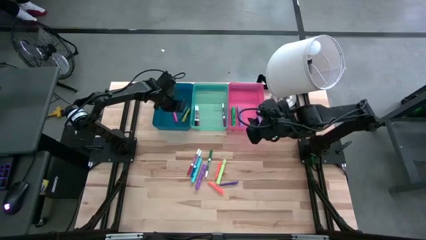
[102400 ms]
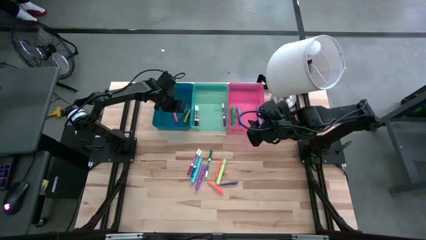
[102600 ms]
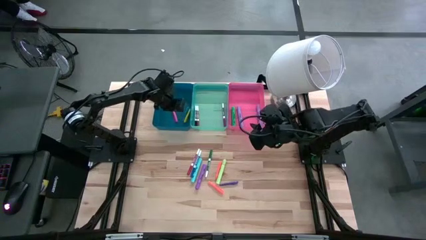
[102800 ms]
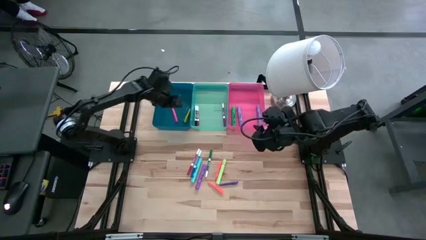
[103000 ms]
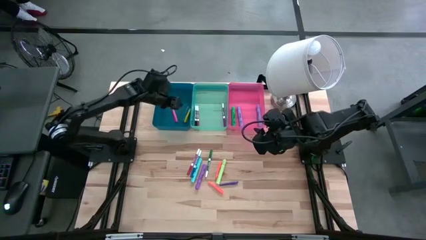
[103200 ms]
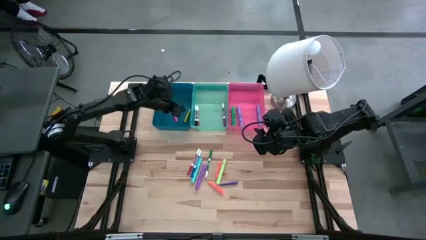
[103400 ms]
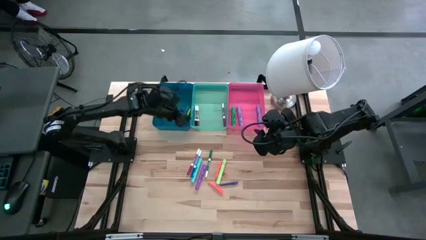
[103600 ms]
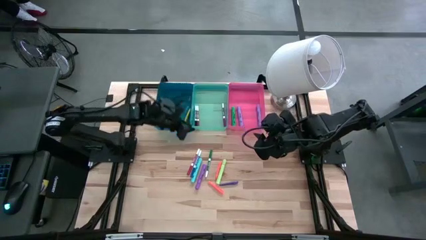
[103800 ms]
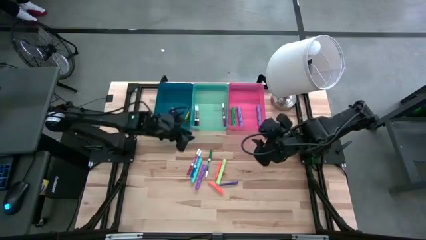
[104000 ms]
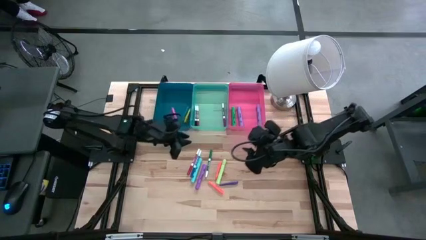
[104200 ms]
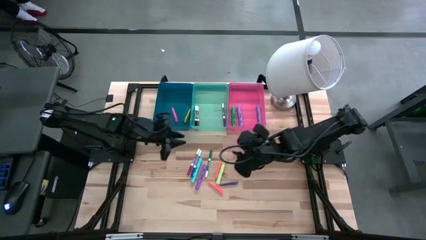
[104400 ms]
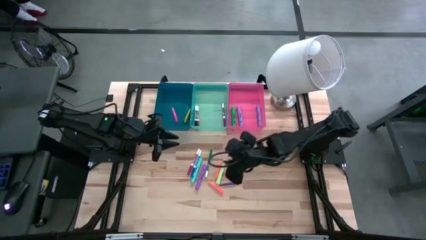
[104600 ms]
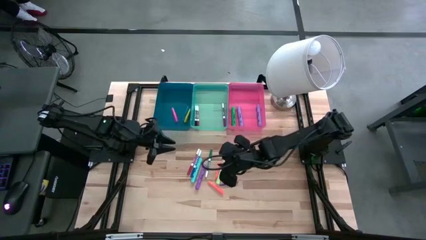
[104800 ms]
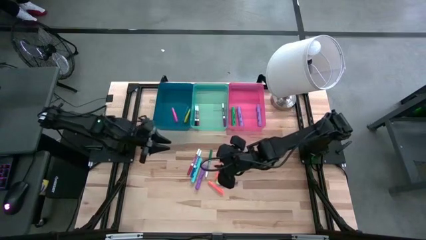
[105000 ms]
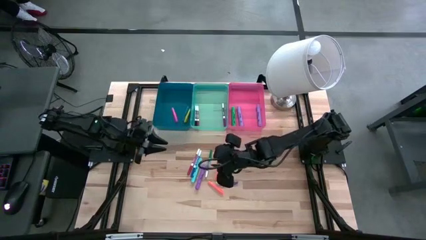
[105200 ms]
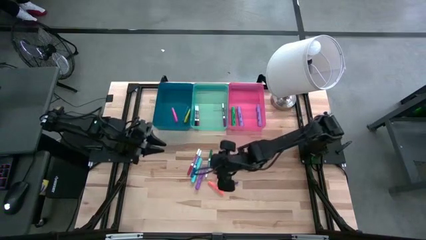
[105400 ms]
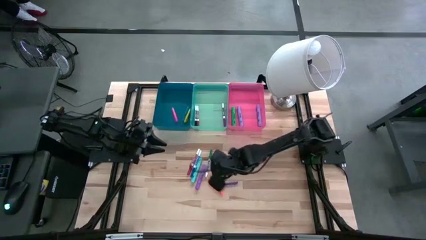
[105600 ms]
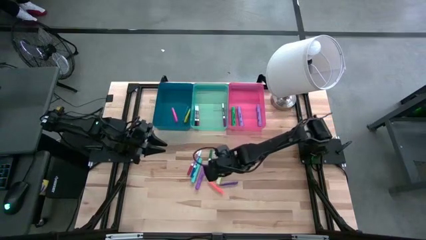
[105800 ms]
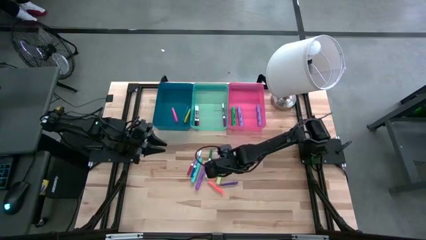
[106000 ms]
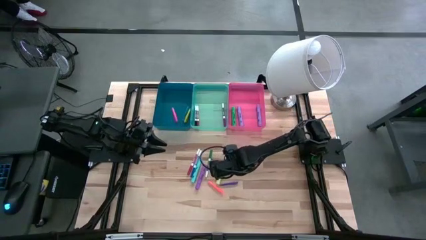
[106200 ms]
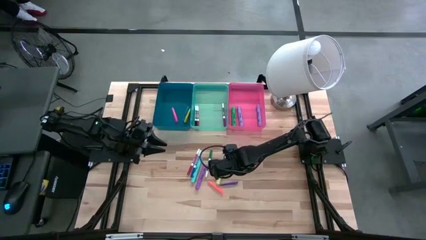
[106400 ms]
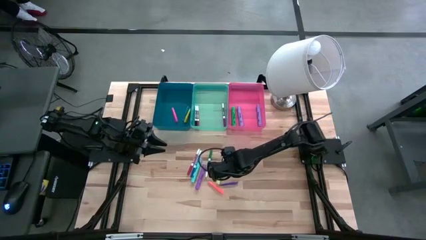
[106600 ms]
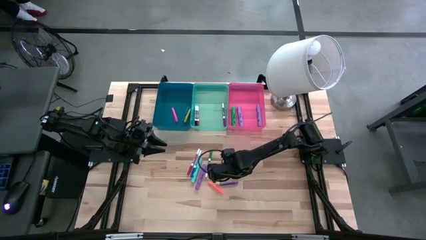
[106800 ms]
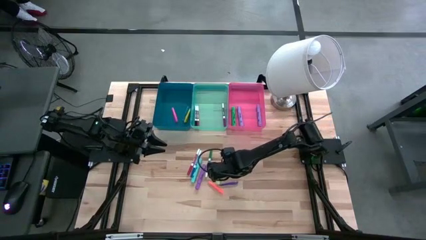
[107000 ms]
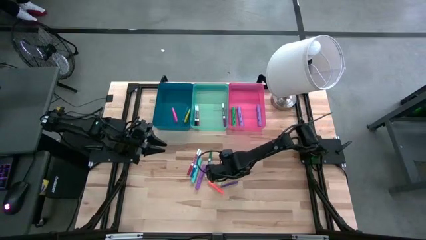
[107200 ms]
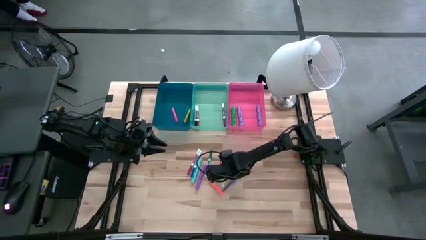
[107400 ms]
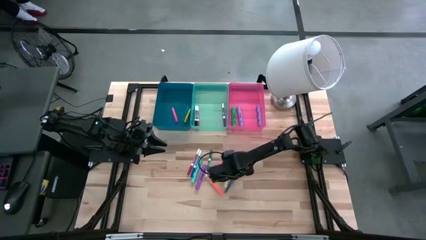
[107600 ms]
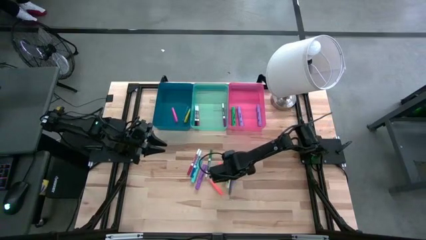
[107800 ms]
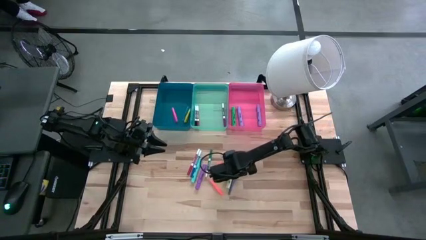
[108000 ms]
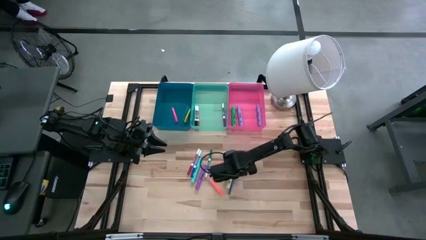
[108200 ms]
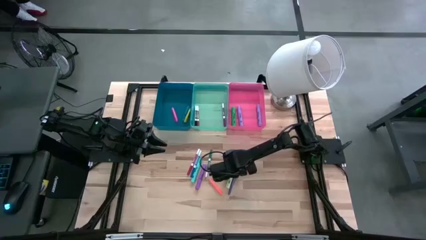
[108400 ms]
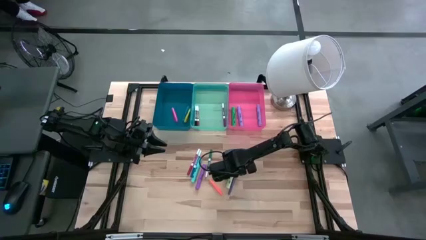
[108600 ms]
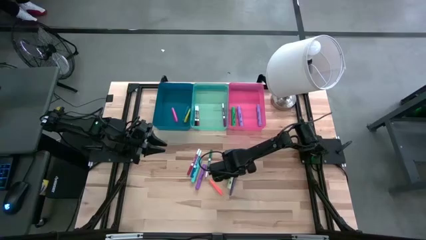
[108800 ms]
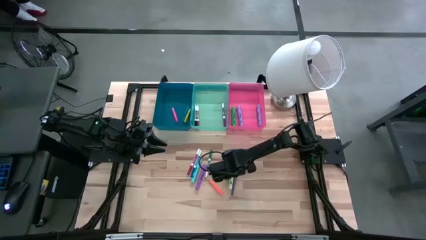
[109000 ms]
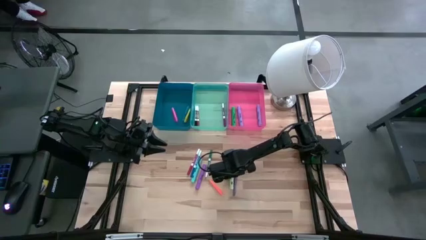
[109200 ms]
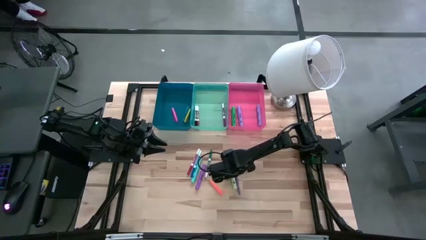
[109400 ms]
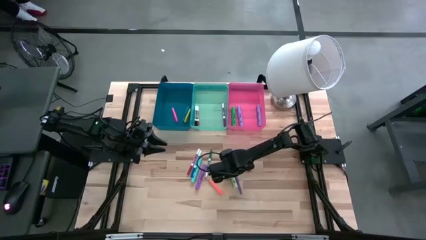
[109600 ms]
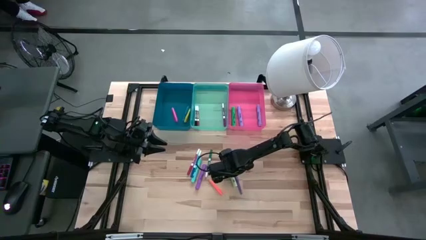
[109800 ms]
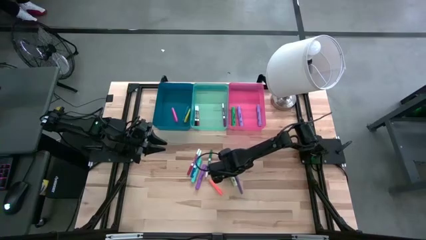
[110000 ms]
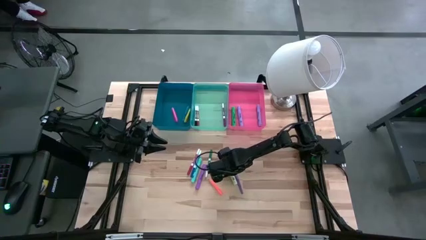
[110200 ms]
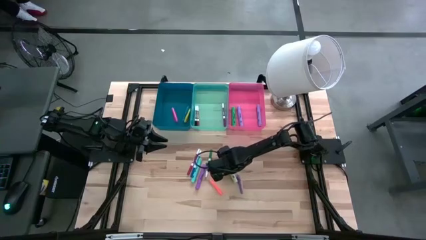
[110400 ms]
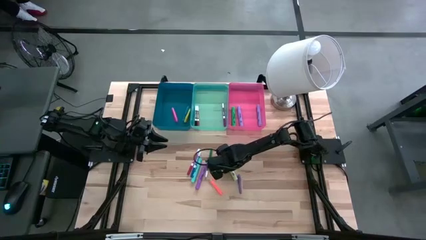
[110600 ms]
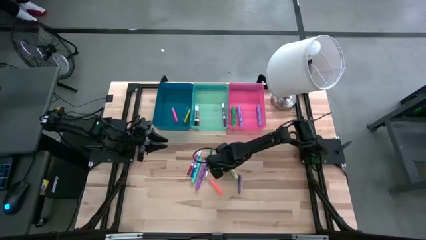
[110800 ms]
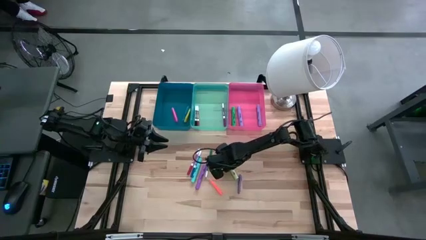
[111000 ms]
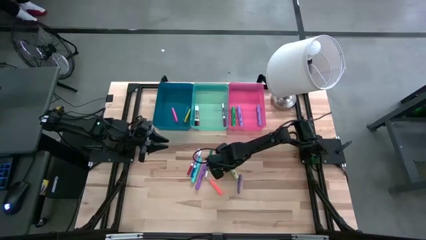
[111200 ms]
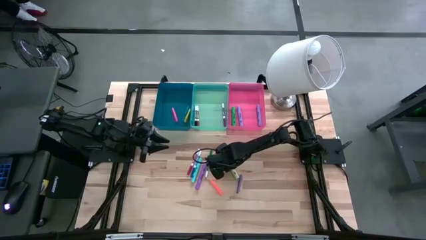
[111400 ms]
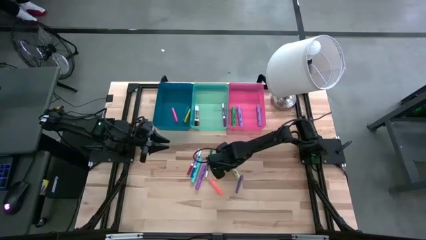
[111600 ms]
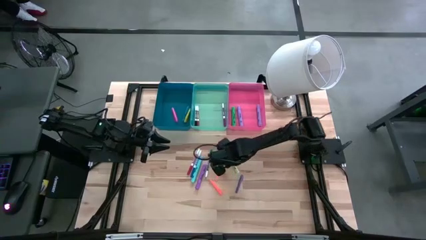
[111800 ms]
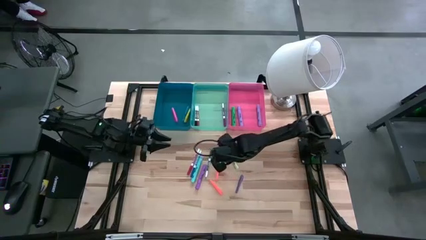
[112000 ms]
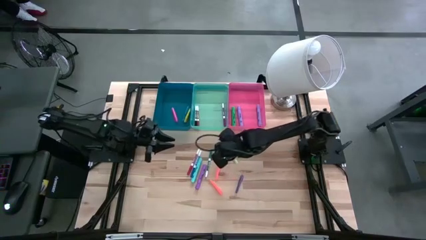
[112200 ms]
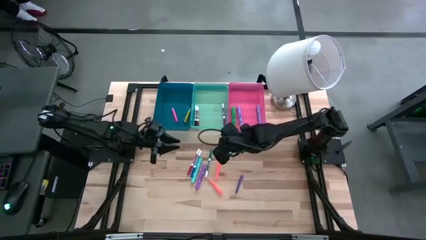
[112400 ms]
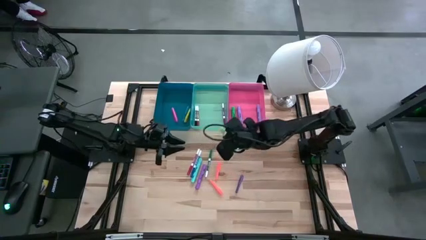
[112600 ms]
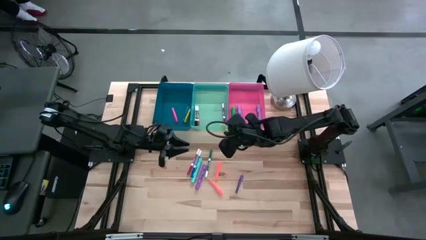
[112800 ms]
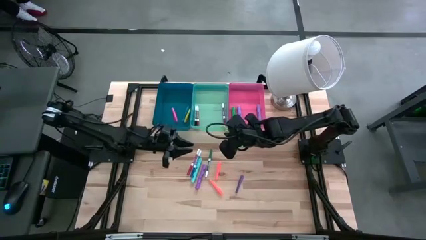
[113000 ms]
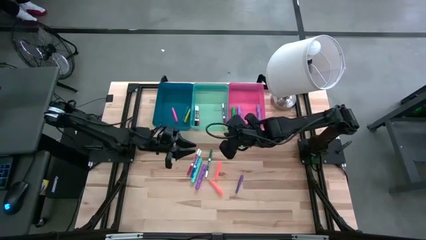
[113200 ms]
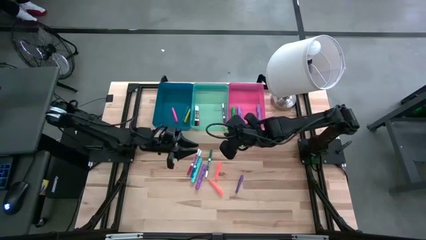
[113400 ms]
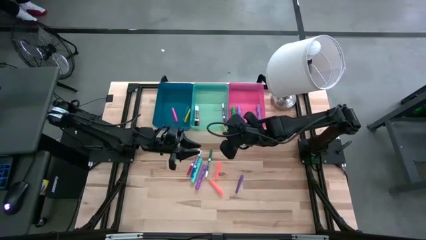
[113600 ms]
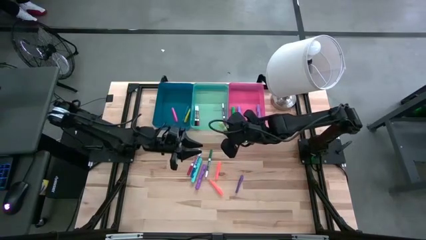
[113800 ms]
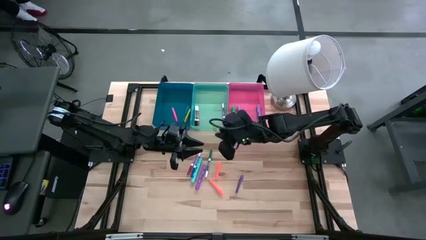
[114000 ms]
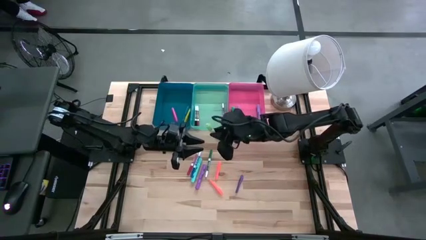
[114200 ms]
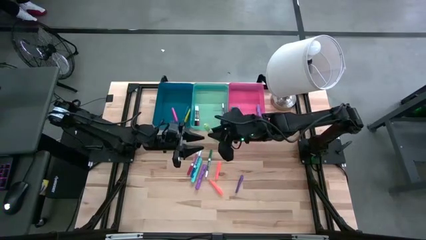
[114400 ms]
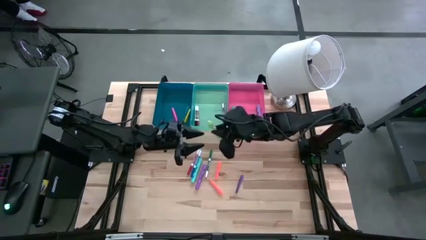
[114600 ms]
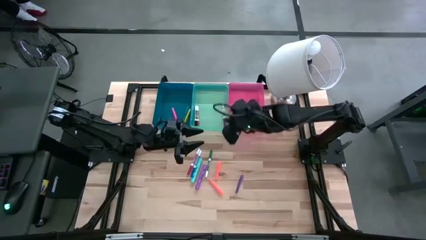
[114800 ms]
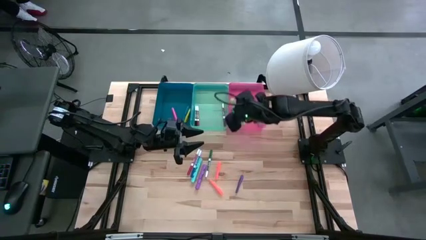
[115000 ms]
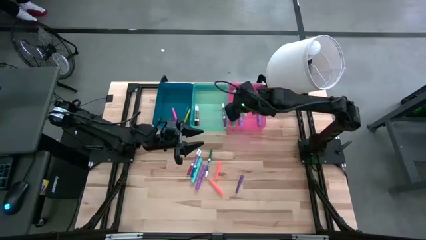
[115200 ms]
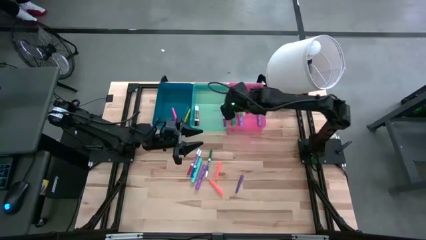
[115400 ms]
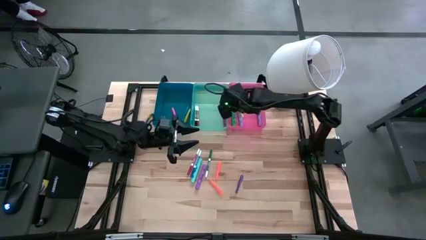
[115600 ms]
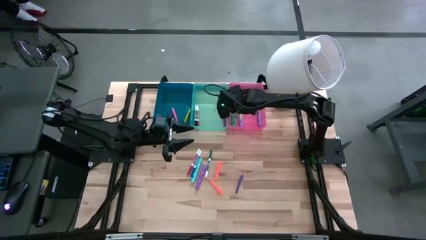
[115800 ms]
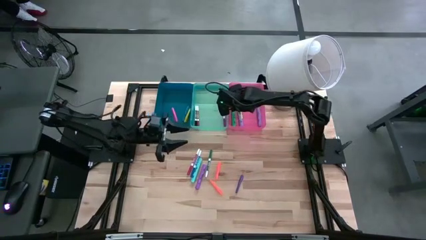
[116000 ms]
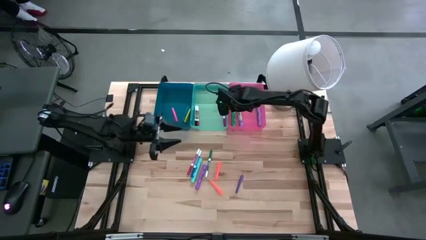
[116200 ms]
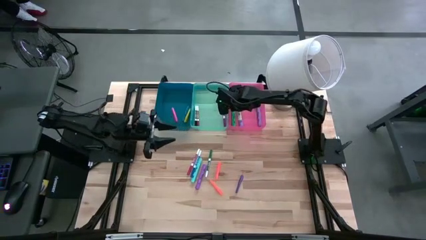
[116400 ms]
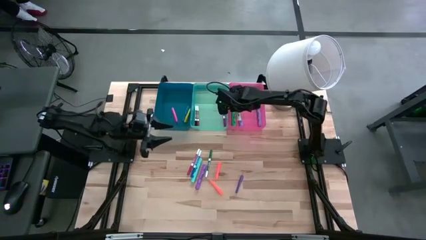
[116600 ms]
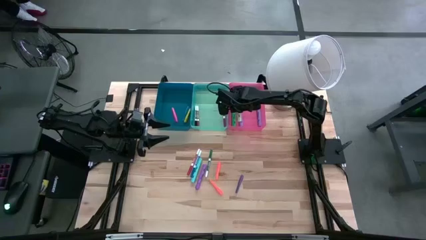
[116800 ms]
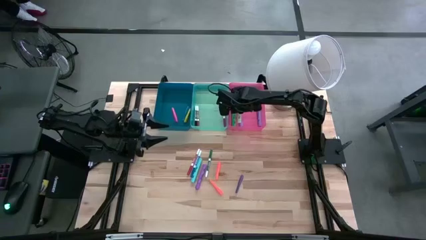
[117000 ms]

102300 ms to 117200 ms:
Task: Pick & Place Markers
Put the light green highlighter pen into the pink bin

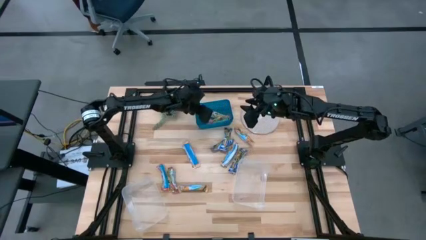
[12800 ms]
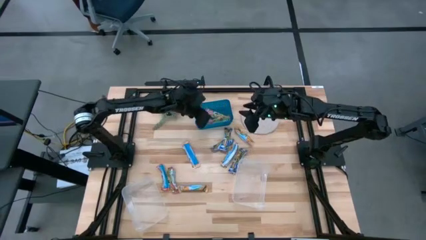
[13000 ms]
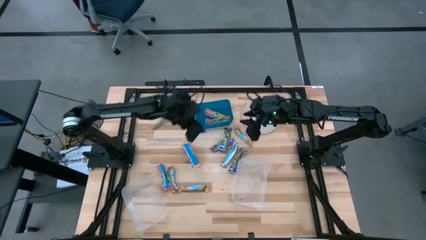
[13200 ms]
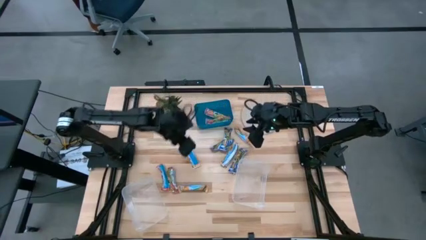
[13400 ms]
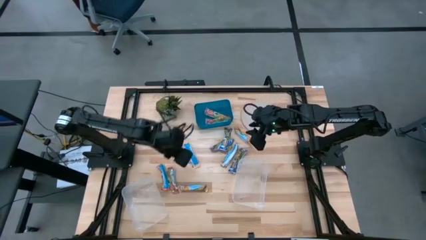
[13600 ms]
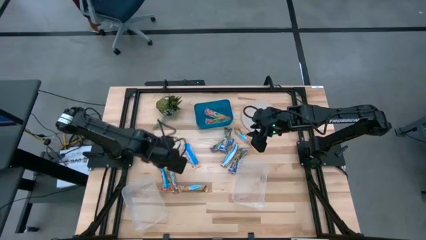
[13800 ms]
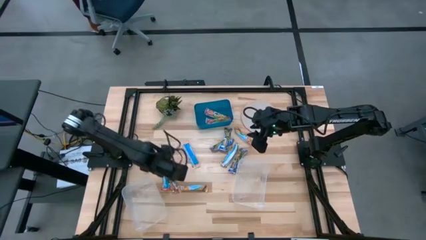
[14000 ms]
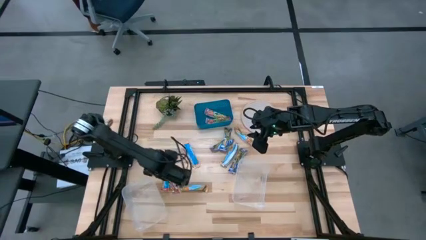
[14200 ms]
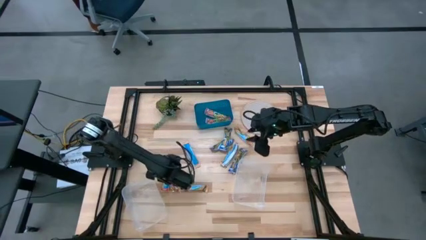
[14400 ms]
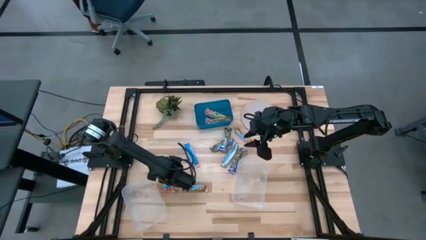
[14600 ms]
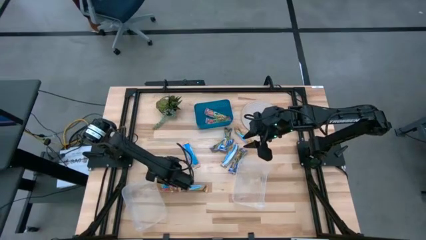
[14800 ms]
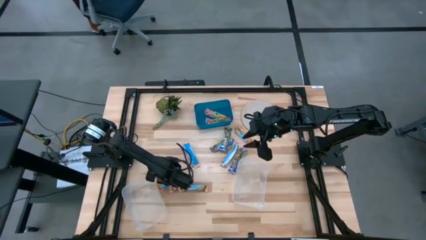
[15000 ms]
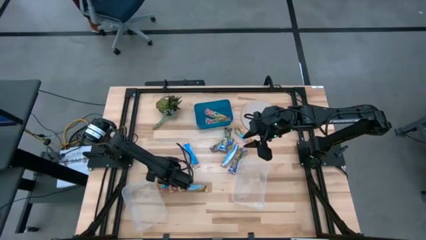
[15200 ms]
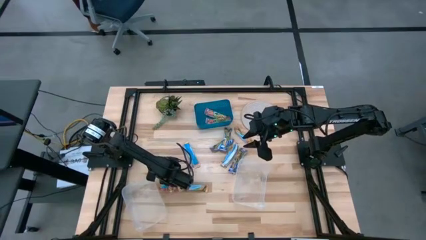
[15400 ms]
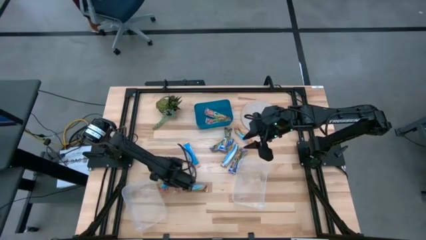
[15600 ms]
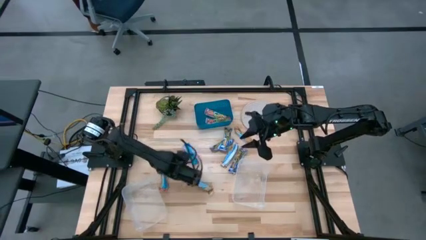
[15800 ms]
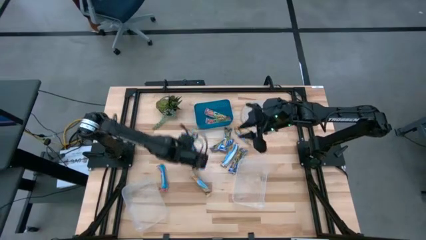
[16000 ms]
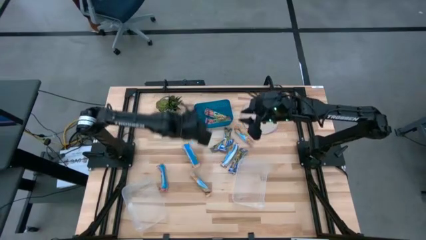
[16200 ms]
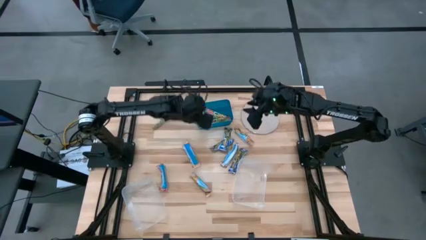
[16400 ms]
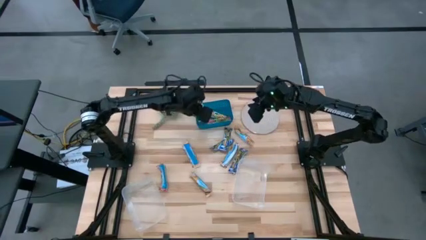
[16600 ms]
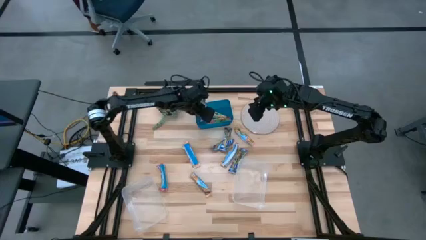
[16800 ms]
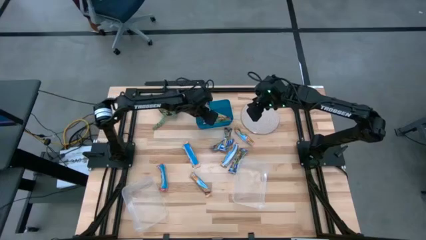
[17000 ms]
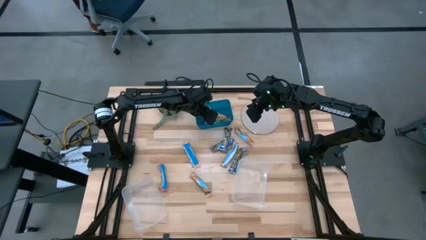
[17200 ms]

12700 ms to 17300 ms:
Task: Pick and place Granola Bars by type
Put the red granola bar into the blue bin
